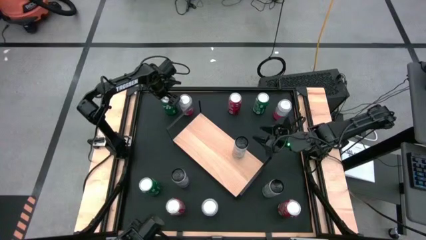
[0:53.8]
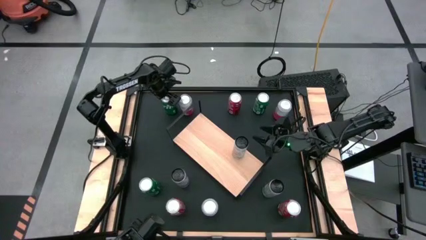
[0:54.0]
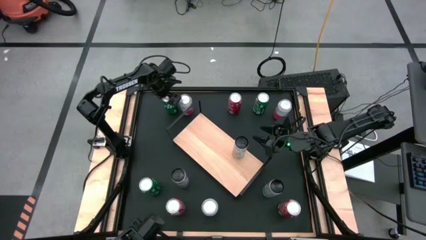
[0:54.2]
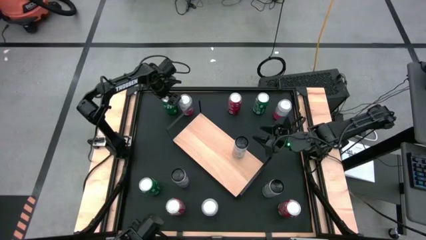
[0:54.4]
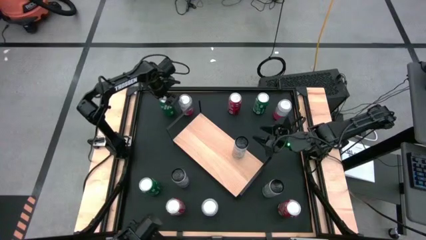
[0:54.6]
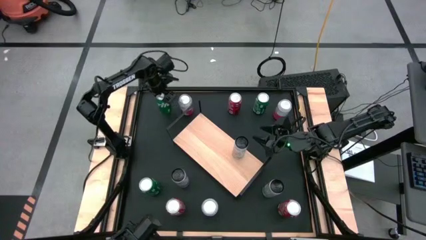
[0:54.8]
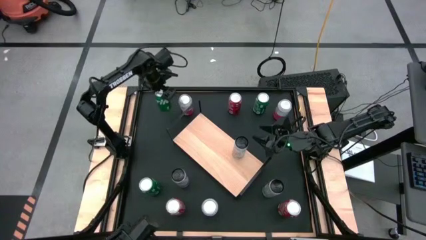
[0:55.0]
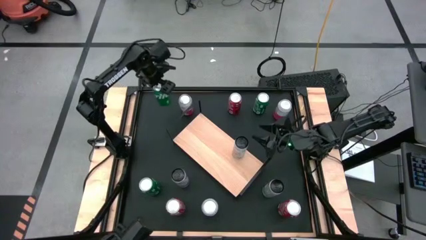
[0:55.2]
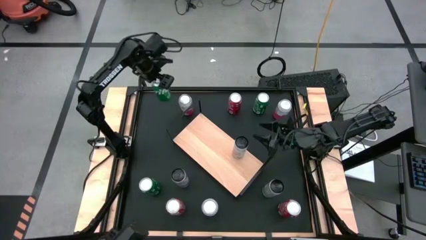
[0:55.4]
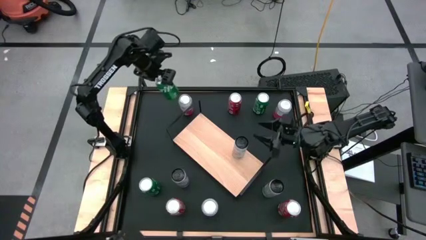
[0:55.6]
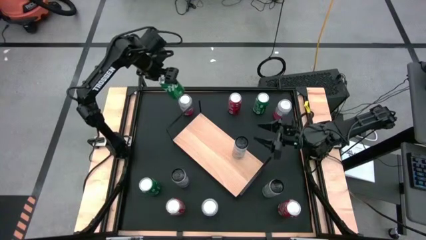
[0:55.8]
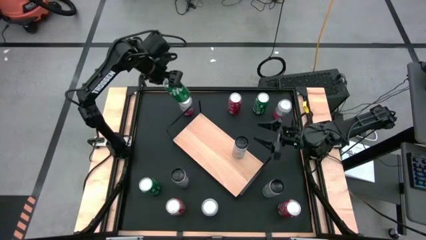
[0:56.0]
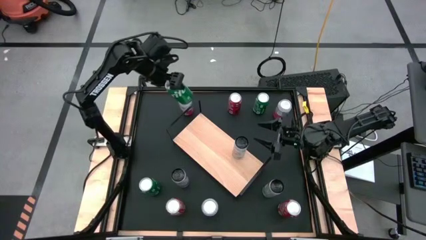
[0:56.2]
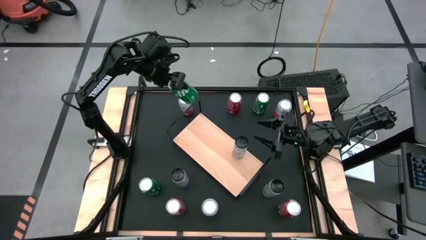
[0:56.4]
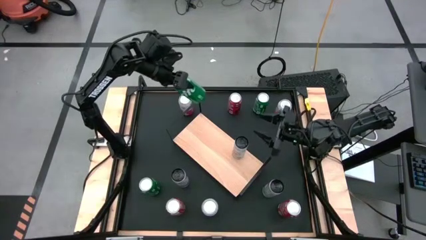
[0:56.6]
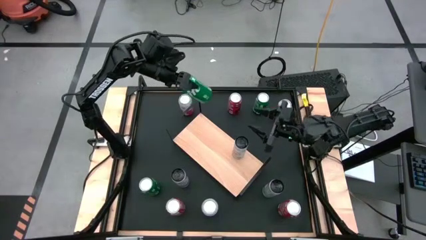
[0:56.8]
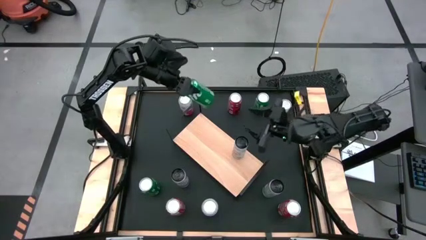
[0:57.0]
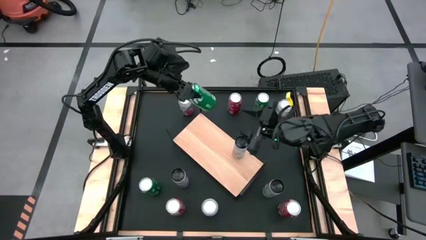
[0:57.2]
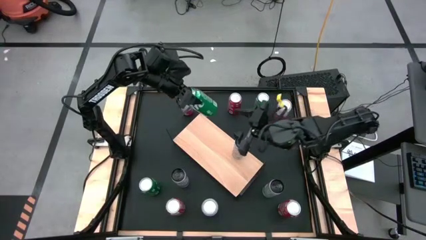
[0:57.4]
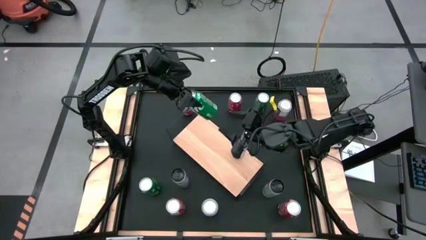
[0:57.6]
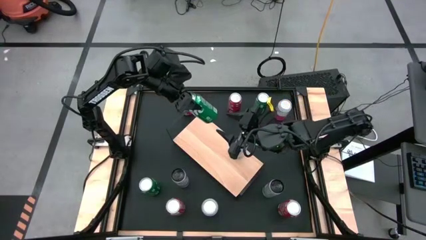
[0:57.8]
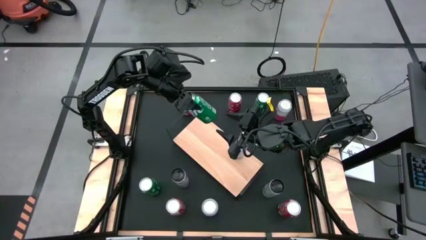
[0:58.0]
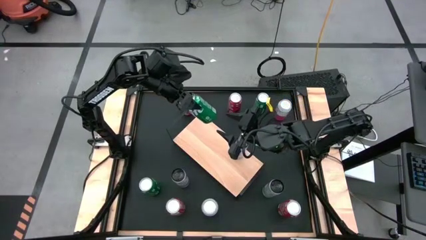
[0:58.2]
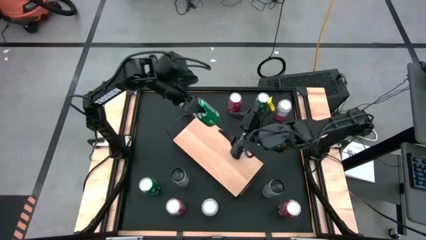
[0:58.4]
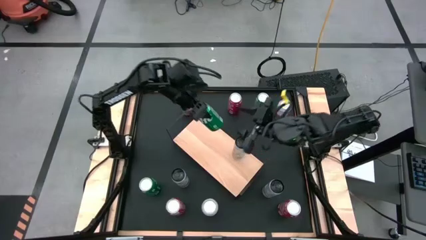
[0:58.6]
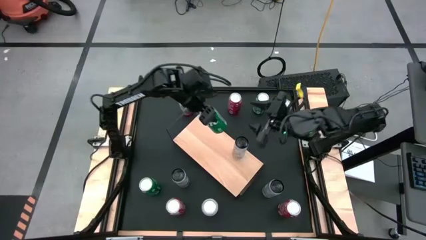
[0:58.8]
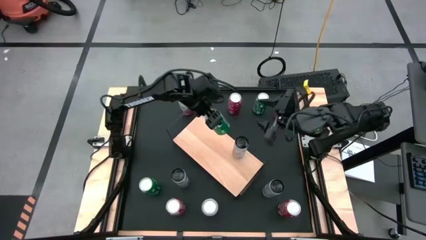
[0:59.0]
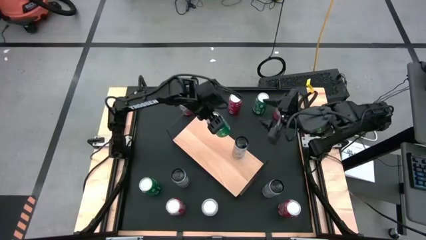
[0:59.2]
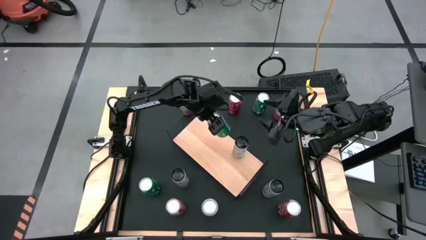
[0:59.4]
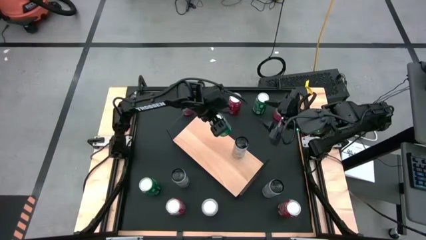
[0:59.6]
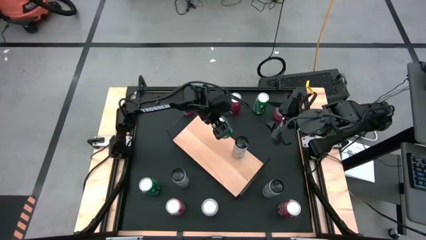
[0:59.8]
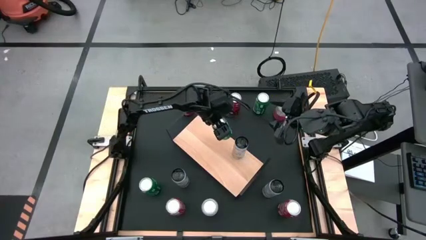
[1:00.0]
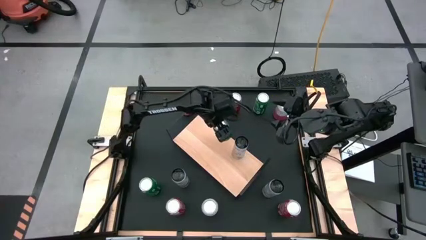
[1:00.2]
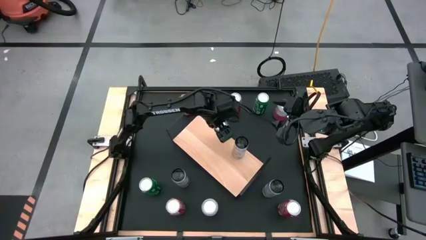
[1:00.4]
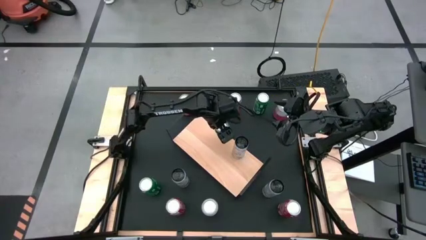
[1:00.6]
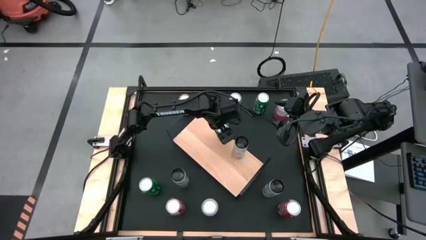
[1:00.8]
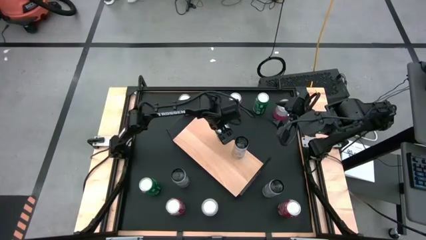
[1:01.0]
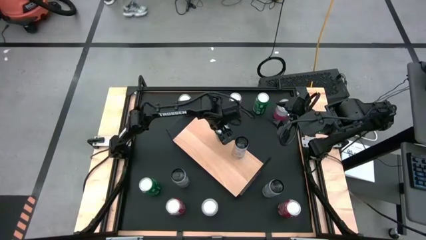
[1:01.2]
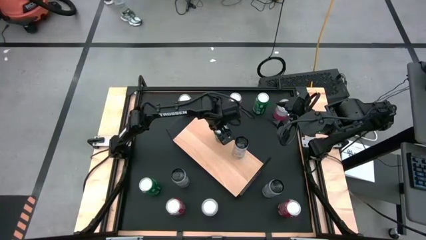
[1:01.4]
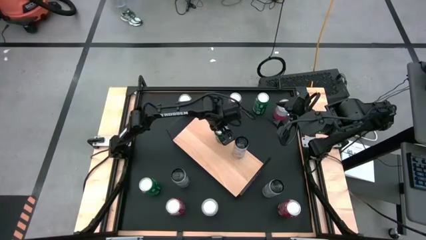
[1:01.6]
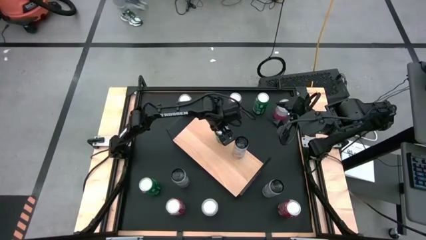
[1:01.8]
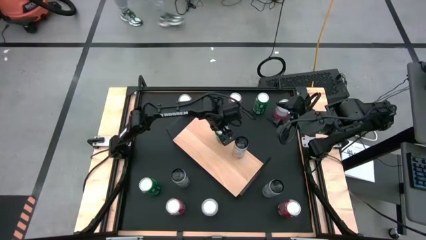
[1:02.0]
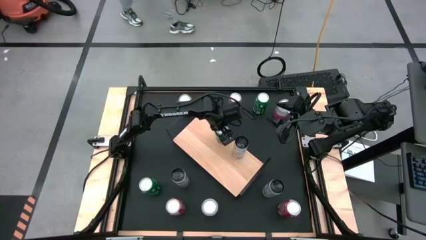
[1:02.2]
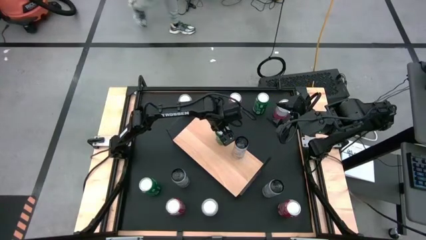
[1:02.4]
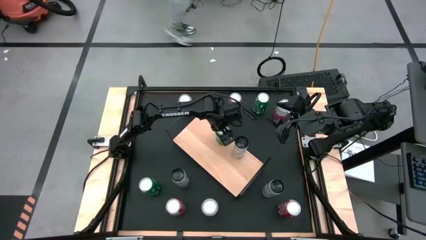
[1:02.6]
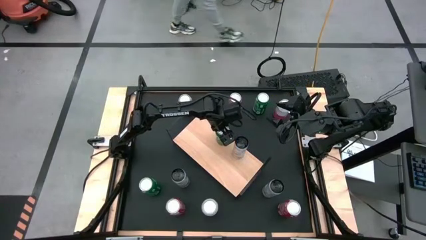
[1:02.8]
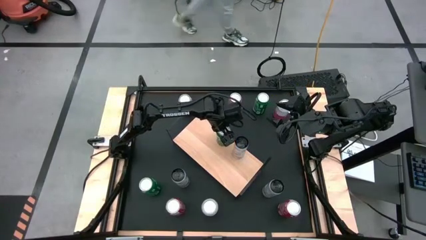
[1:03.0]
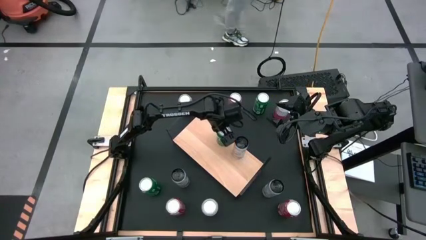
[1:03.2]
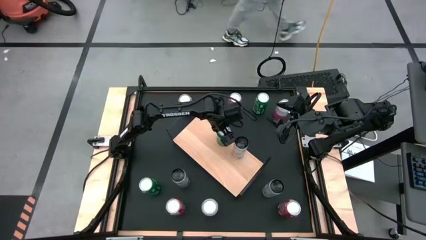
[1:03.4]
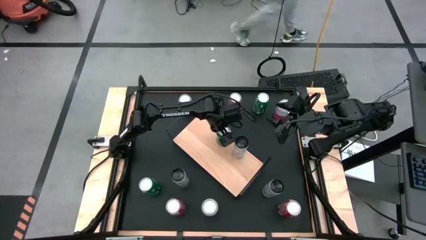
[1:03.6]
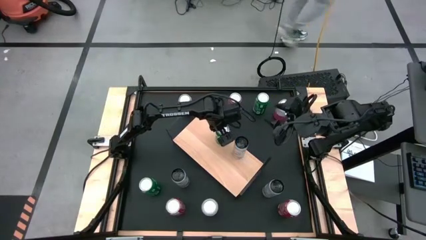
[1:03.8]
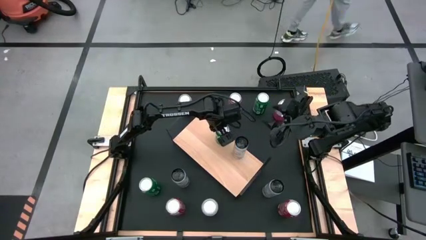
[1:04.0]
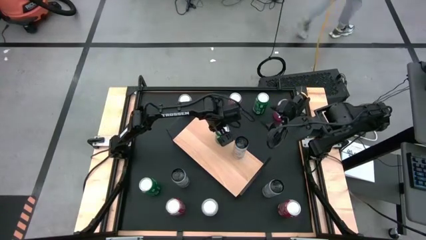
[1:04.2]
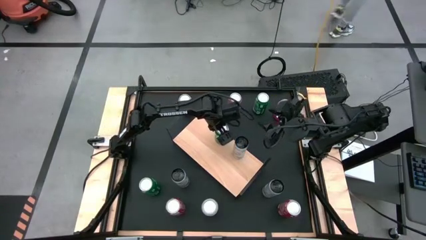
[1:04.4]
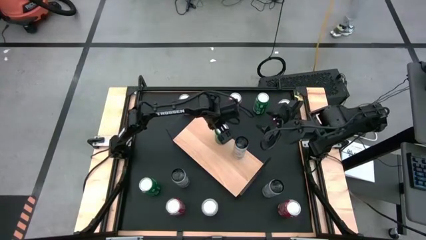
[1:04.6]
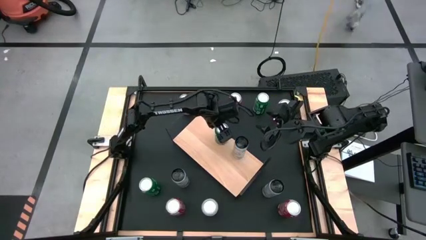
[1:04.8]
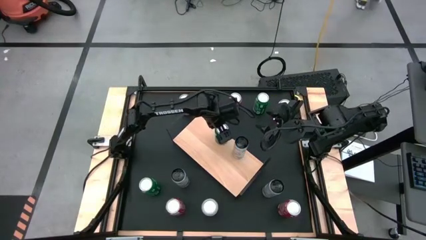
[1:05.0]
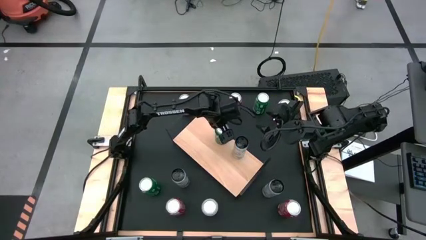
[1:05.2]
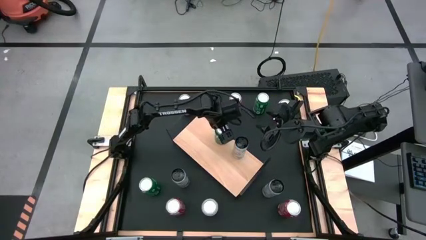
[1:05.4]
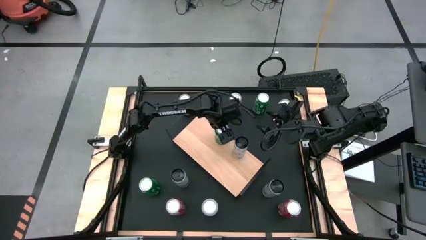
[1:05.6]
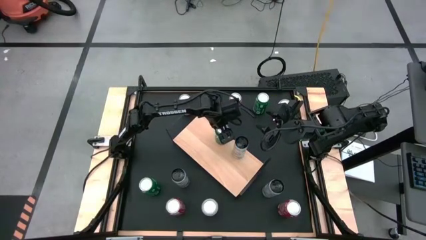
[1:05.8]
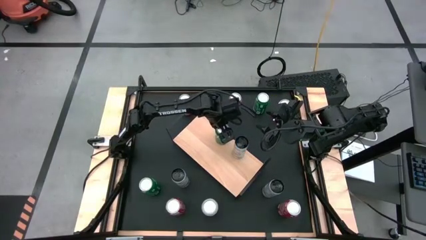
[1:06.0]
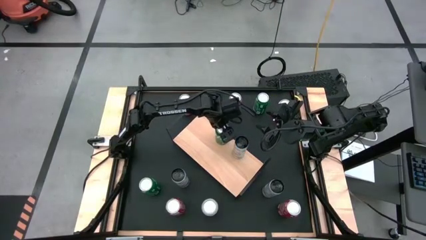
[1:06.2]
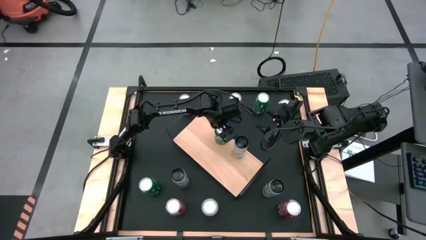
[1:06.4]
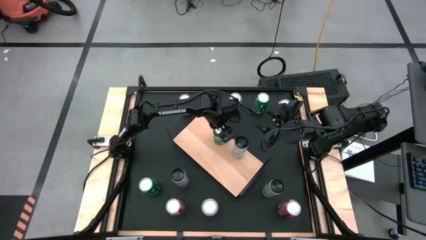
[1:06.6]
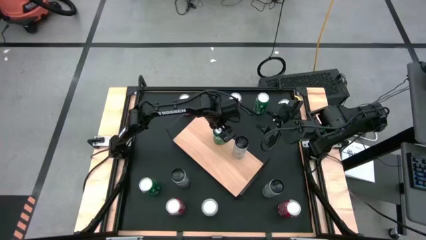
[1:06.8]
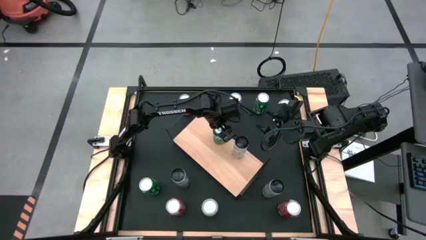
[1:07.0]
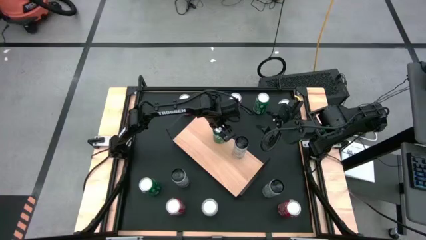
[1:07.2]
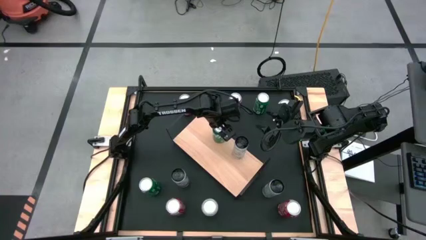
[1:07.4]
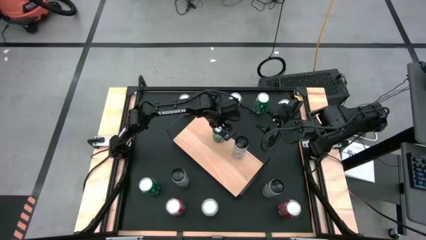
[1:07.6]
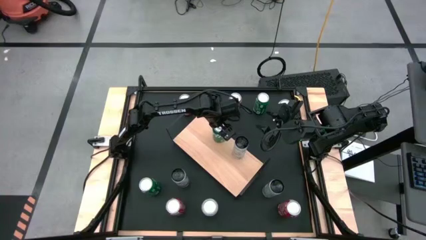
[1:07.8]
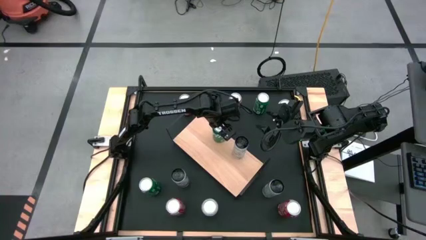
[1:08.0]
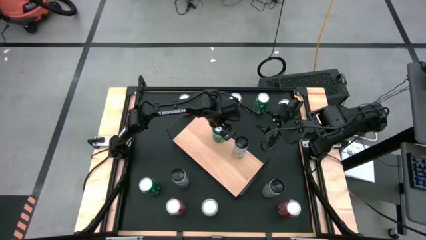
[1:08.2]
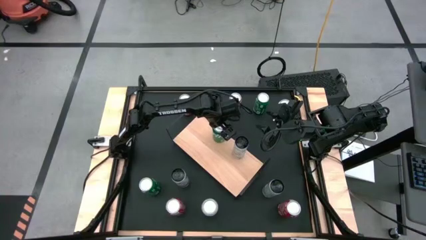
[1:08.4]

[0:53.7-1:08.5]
Task: Place canned beverage on shelf
Put the top left green soda can on the shelf
